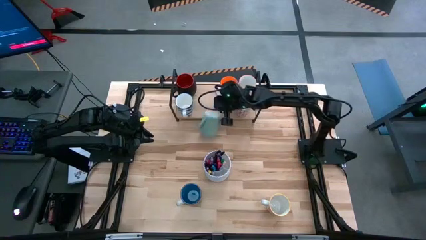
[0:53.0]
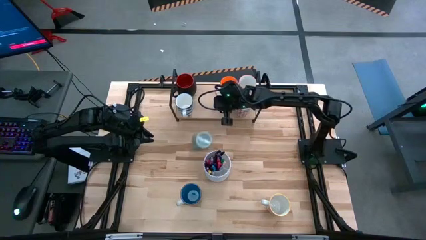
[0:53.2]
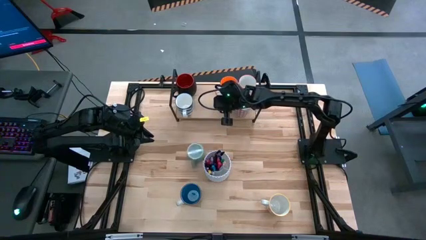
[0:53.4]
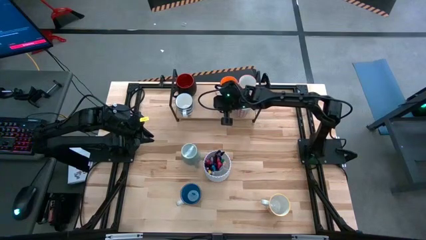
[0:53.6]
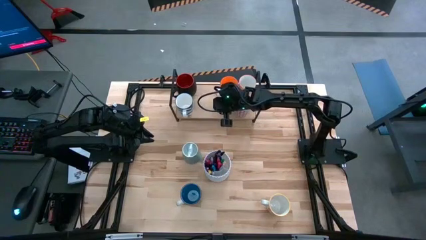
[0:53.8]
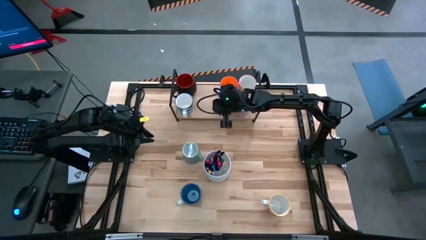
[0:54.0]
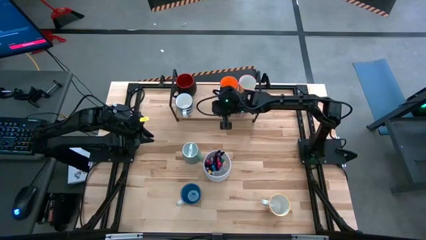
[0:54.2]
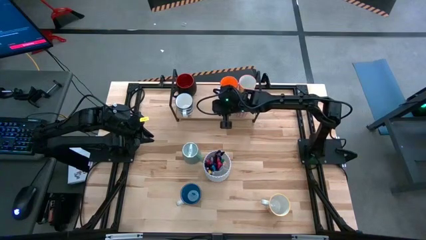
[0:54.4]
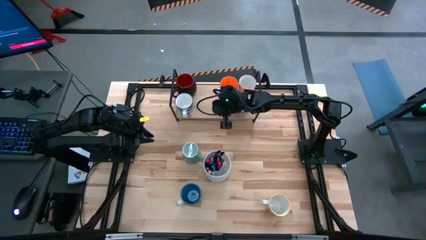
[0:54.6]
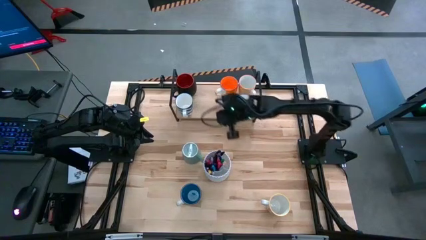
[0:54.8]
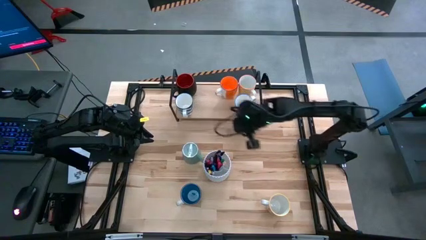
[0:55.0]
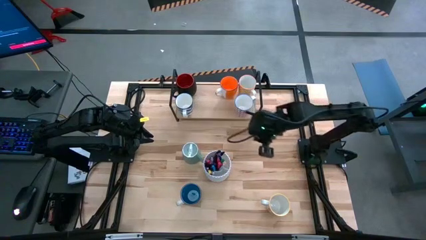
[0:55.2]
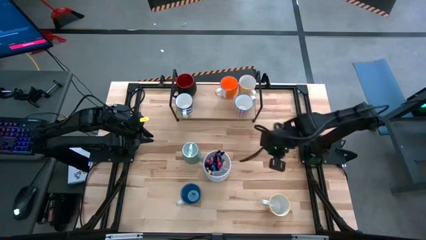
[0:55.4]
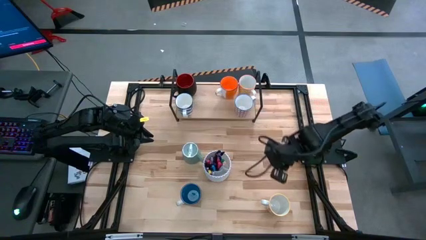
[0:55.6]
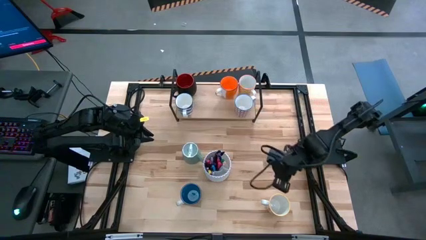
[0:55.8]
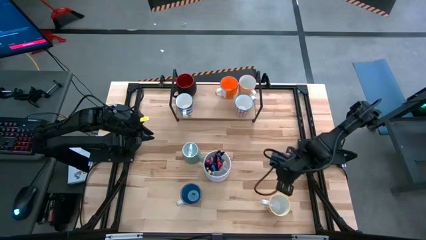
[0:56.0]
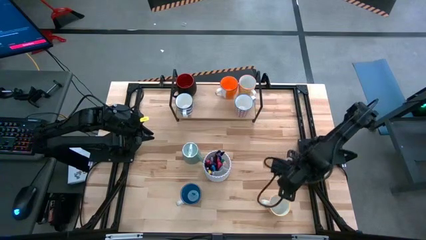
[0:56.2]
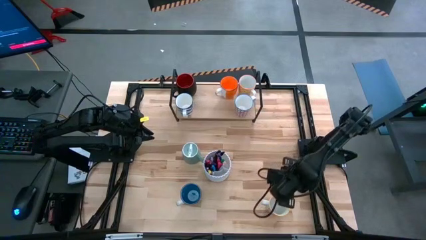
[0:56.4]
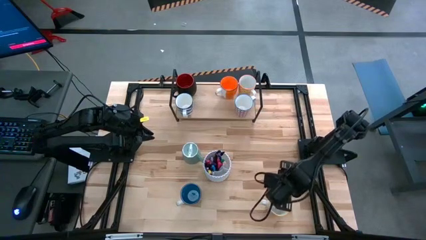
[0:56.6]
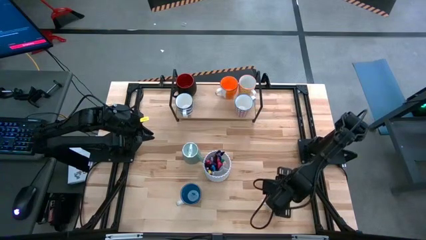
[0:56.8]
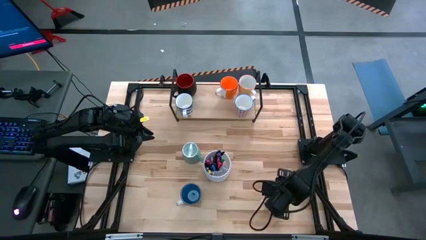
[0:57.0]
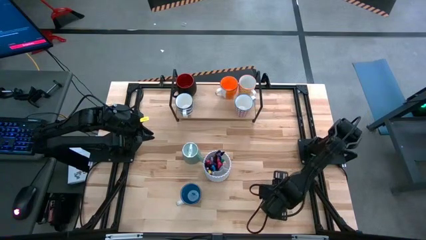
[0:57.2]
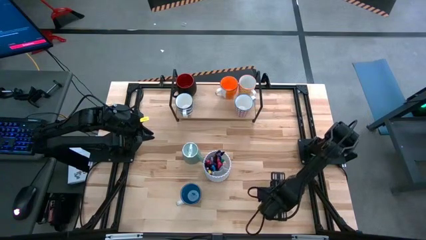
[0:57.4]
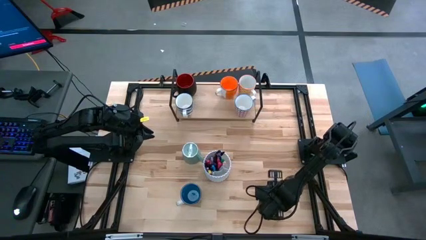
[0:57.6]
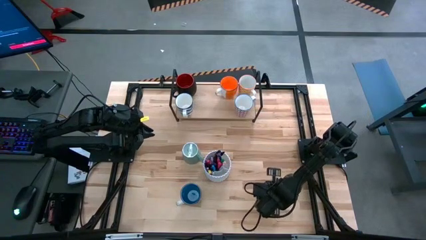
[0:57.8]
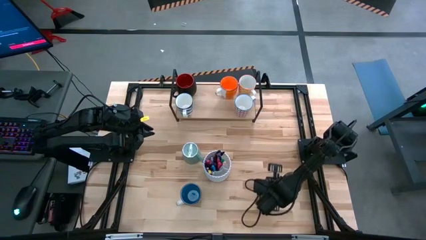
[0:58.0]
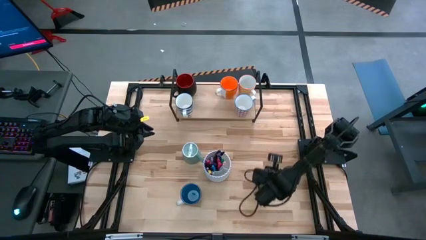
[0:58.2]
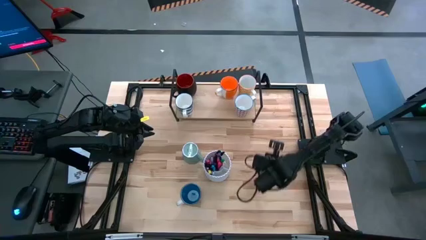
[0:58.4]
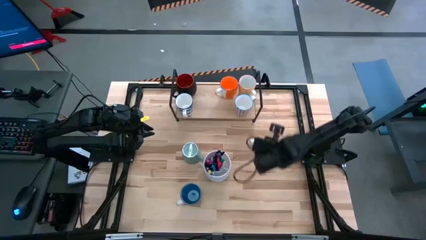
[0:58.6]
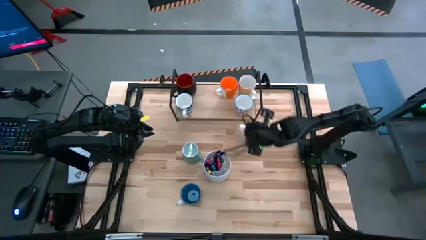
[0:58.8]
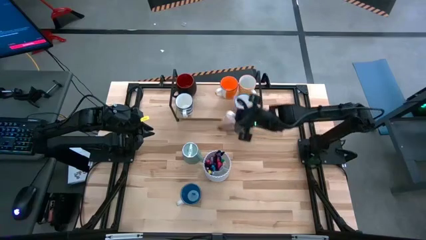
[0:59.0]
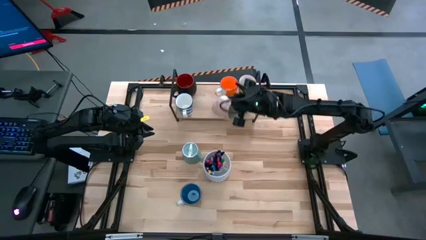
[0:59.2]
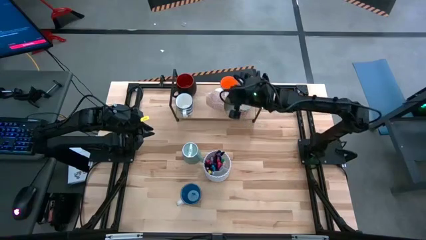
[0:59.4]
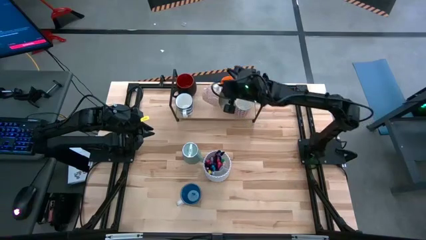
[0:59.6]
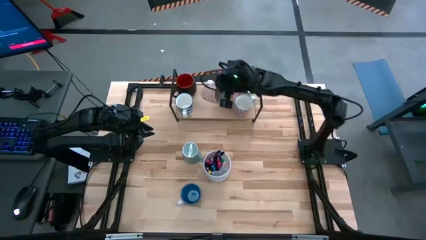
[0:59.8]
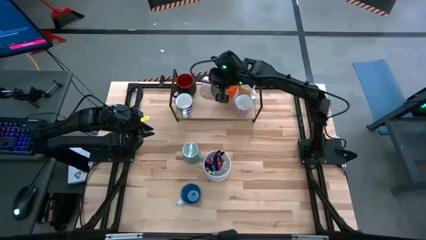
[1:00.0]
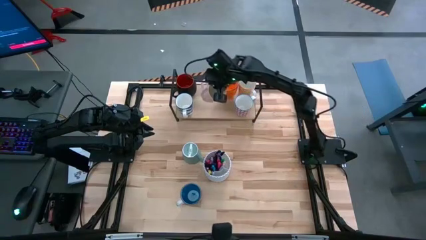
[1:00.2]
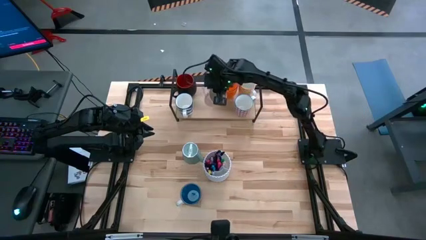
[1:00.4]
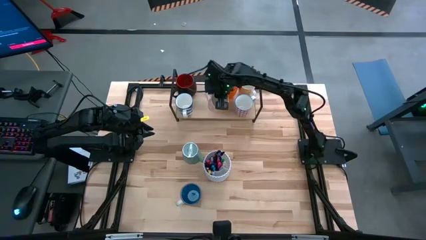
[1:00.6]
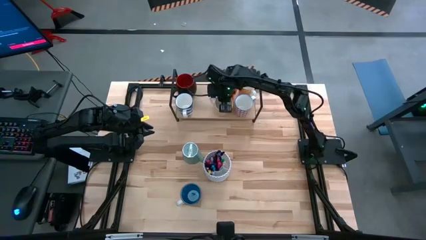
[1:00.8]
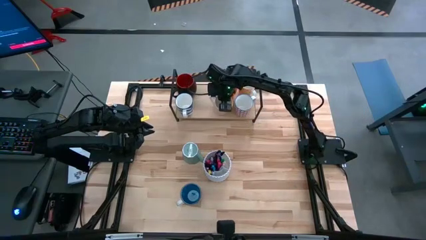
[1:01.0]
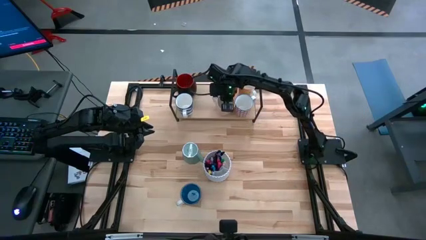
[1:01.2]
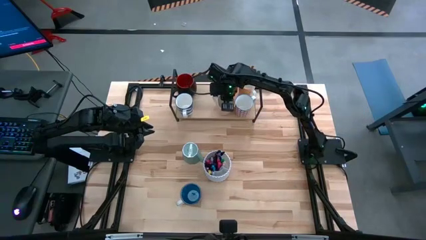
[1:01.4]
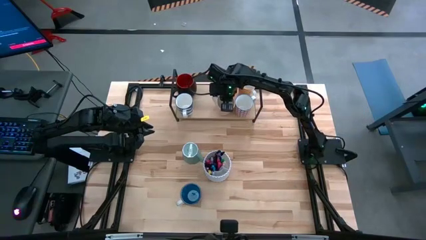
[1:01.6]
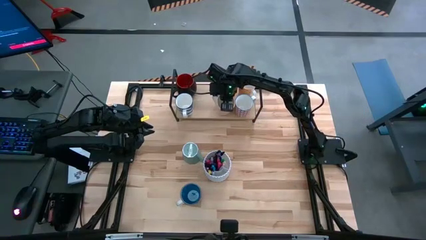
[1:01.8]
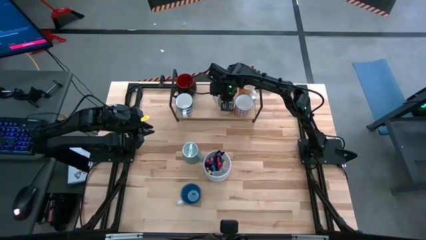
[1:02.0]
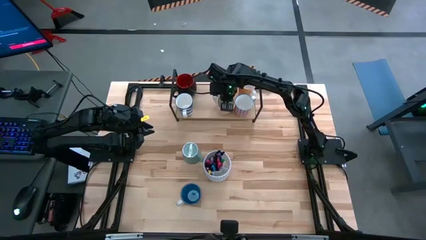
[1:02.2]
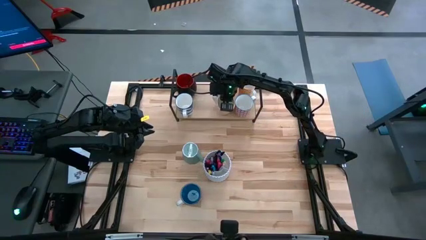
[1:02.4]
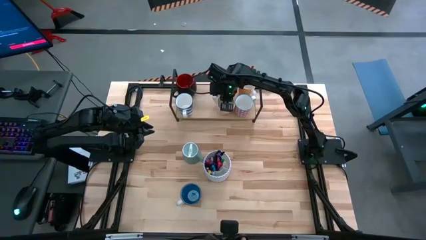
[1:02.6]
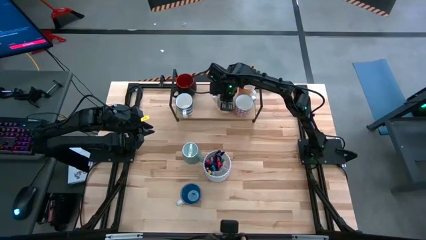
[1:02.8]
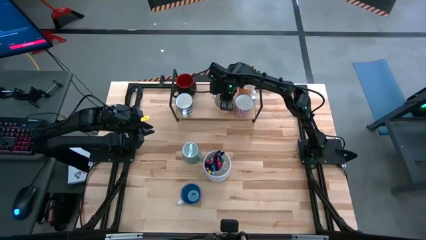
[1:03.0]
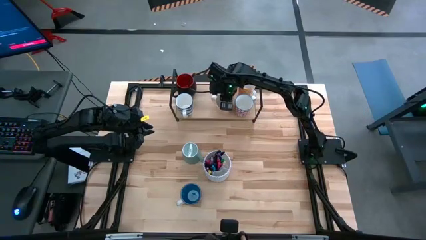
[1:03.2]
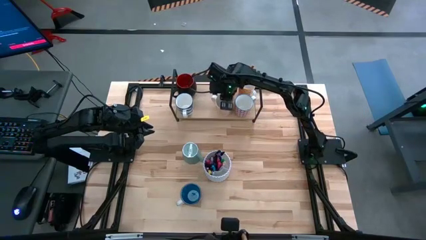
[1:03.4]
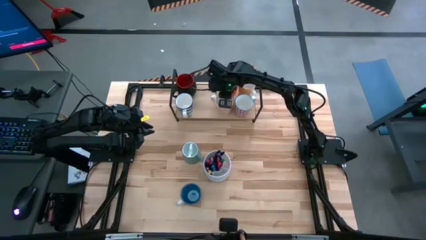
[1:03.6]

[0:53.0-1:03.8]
Task: Place coffee mugs
Put the orange pattern mug on the shelf
